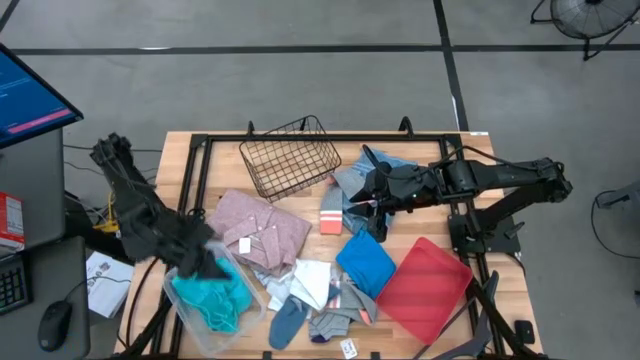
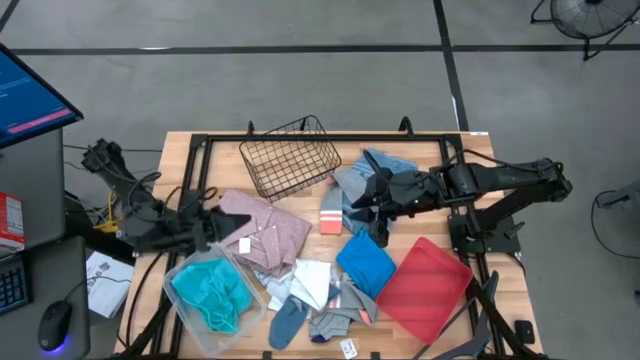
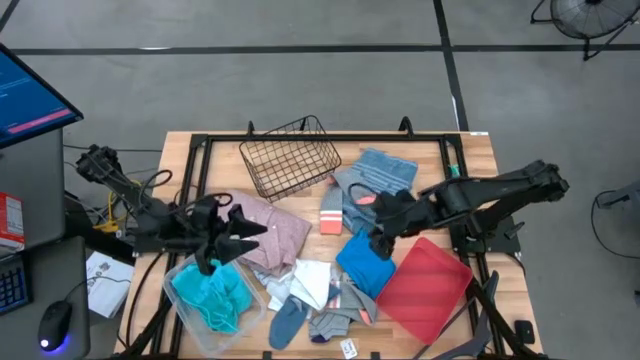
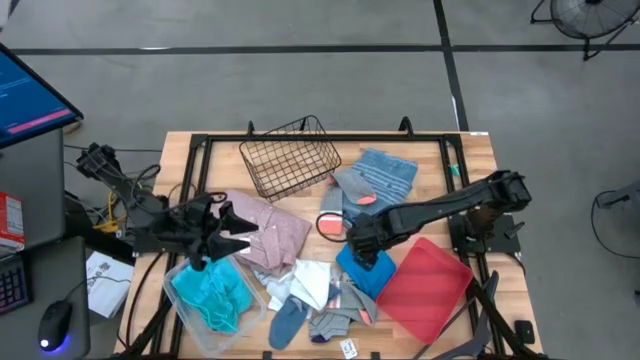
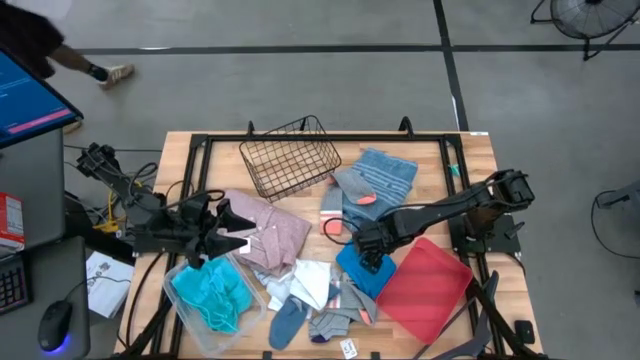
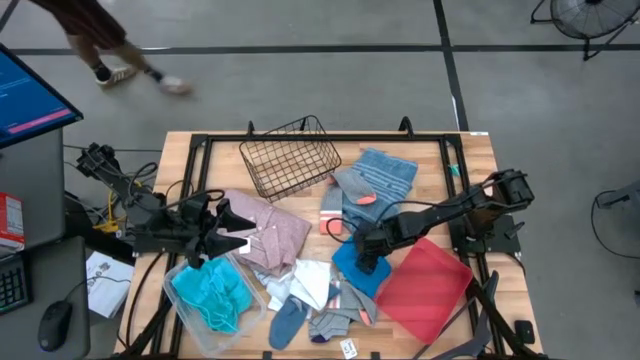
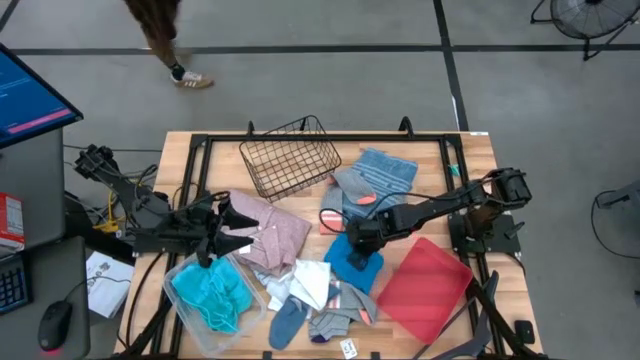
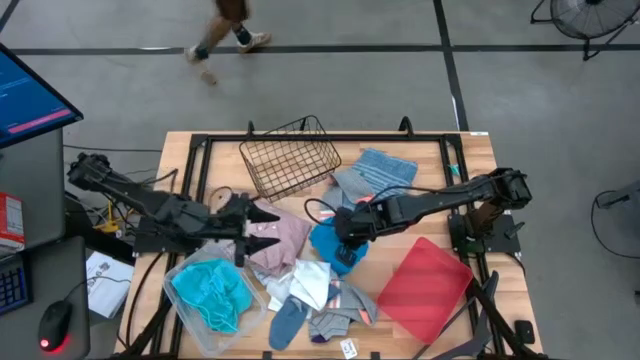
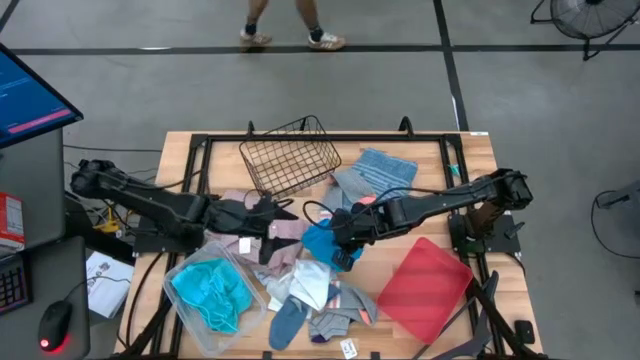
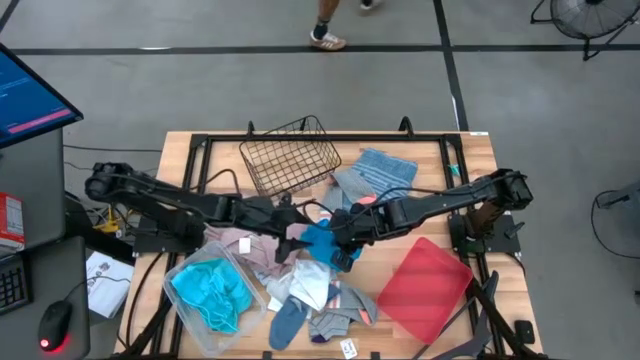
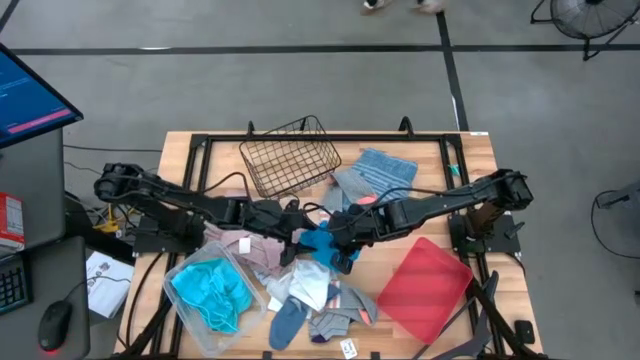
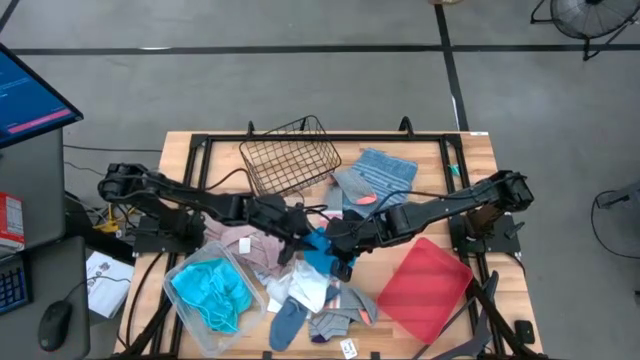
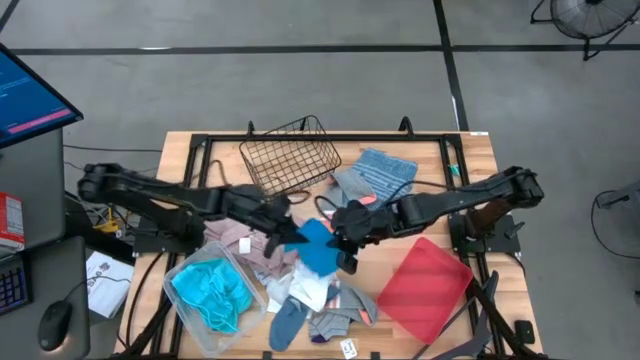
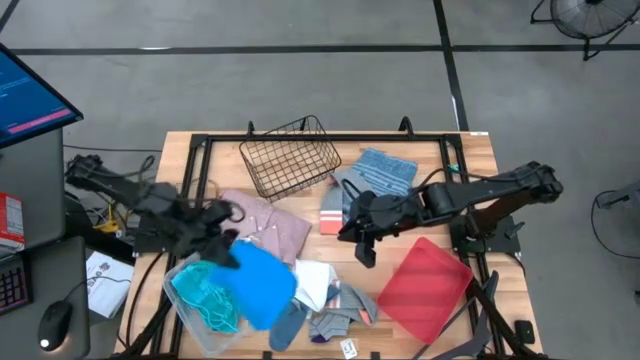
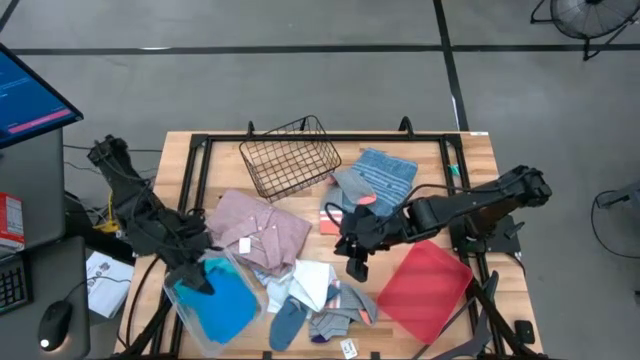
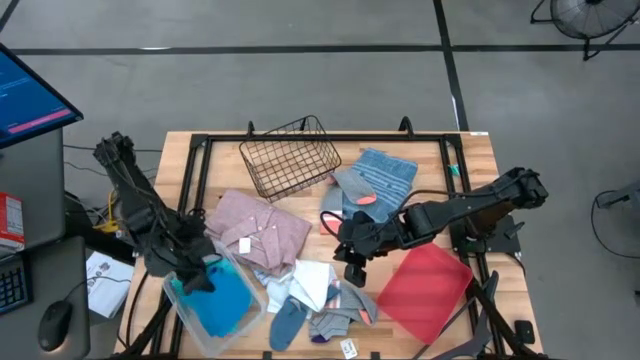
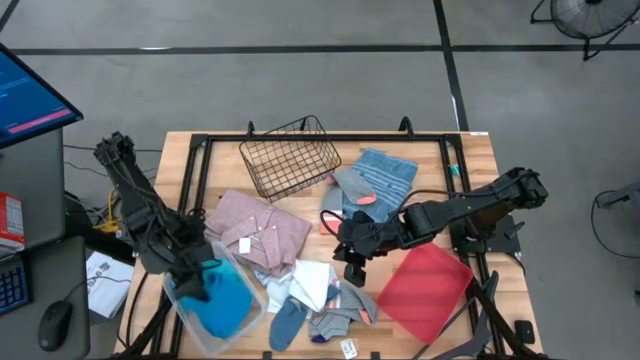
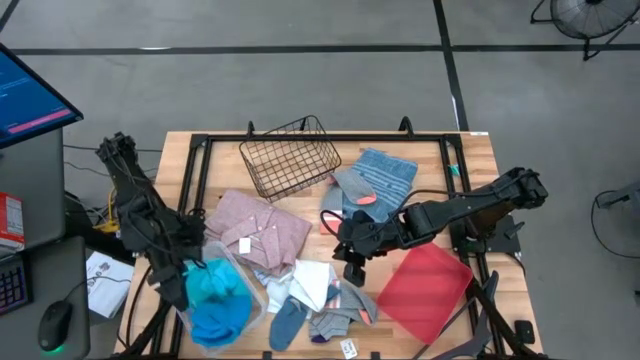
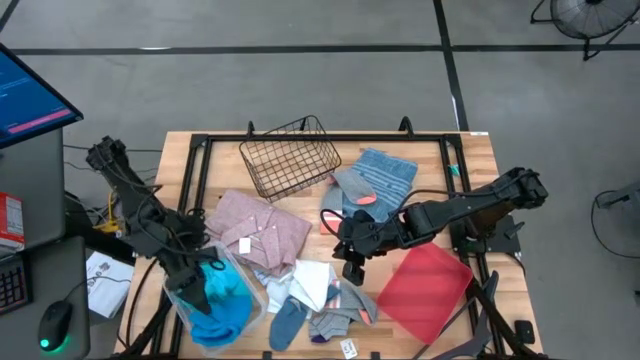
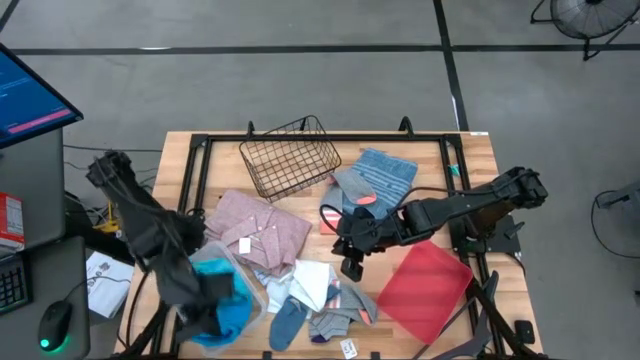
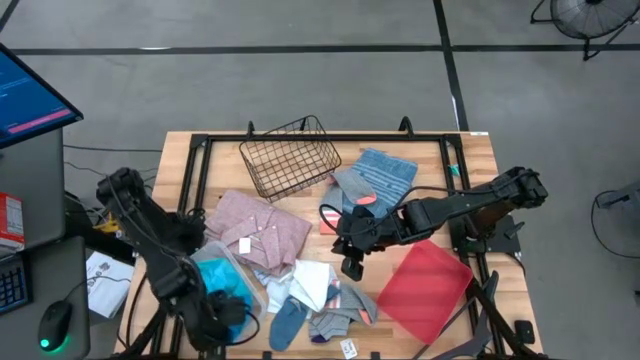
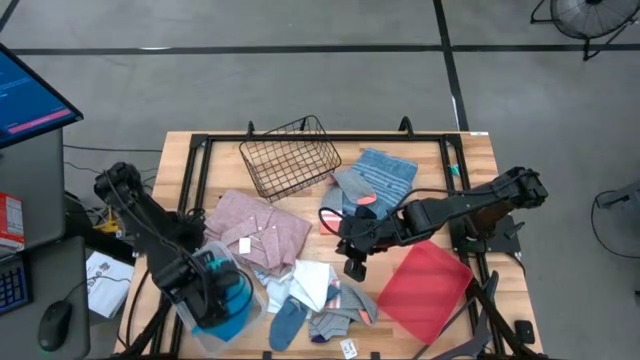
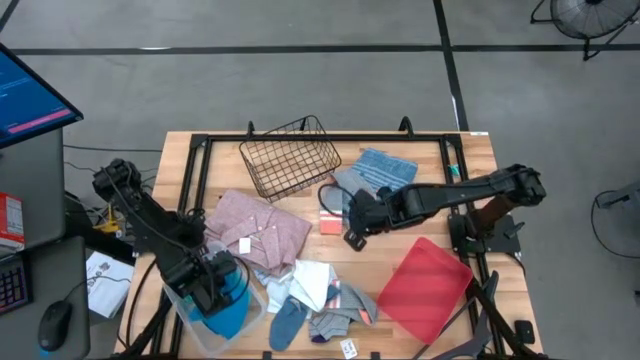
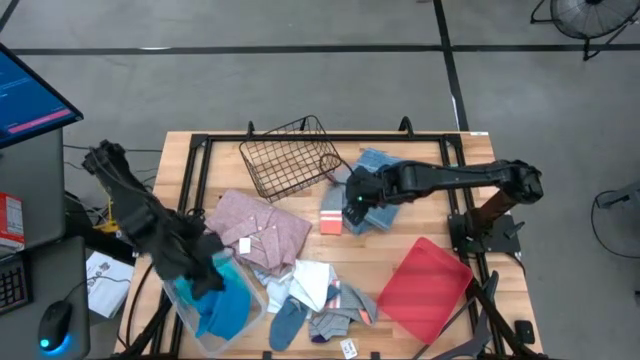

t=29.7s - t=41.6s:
Task: Pick & Place Cloths
Put the blue shorts into the transparent bin

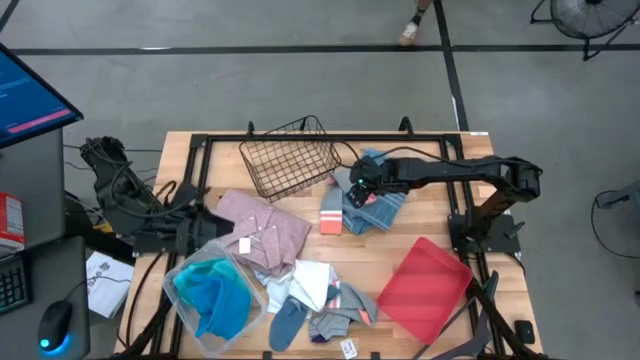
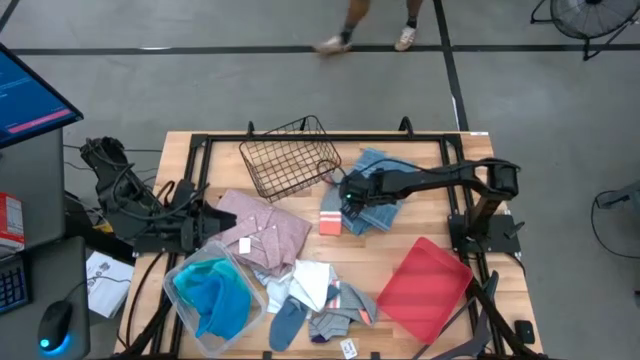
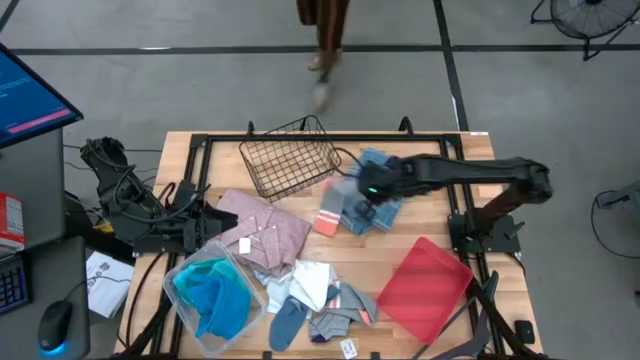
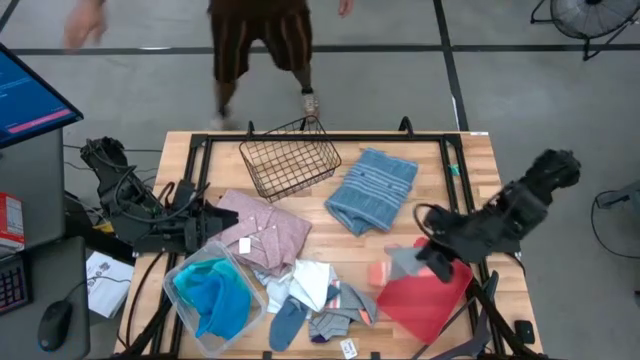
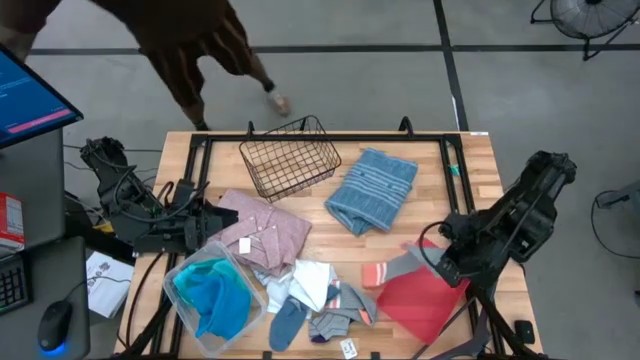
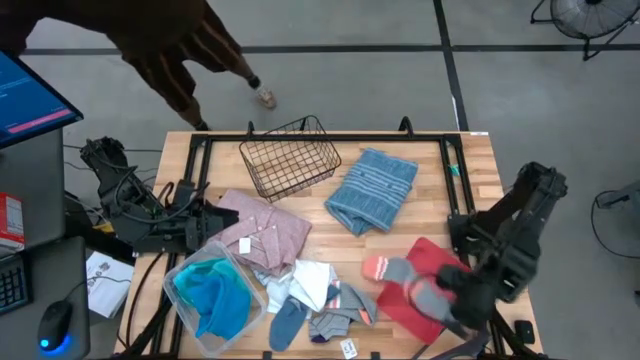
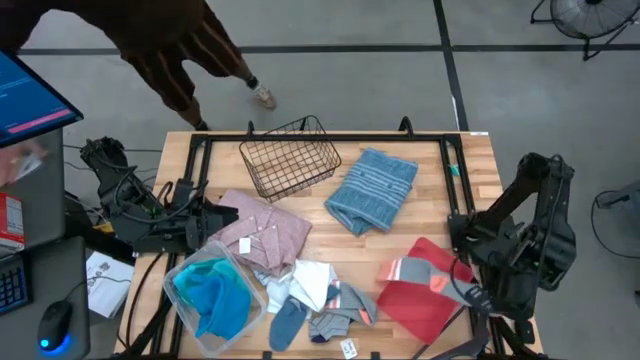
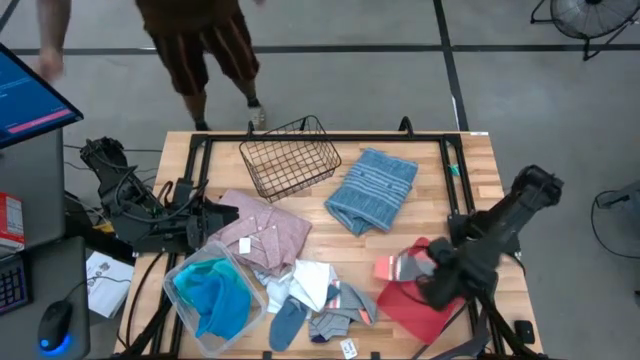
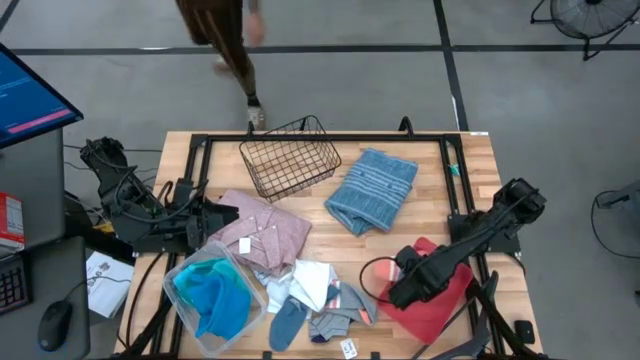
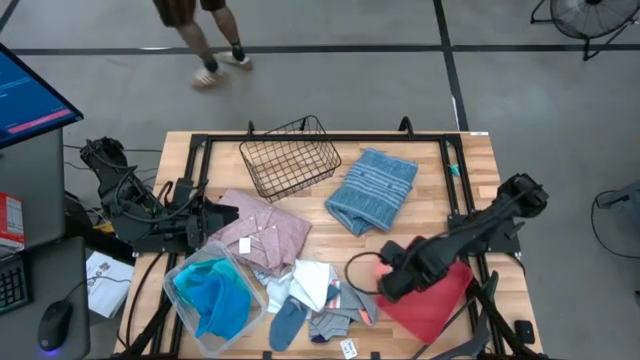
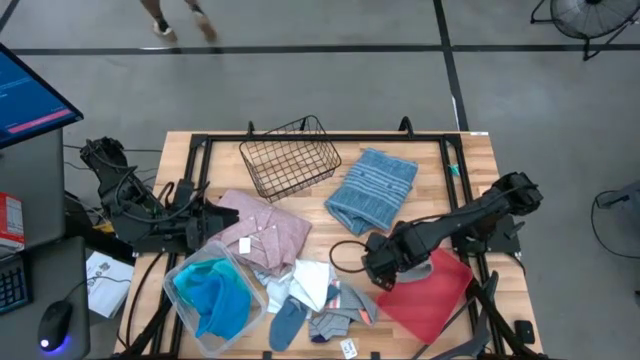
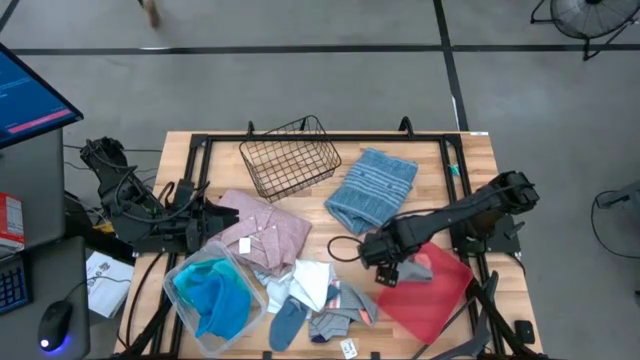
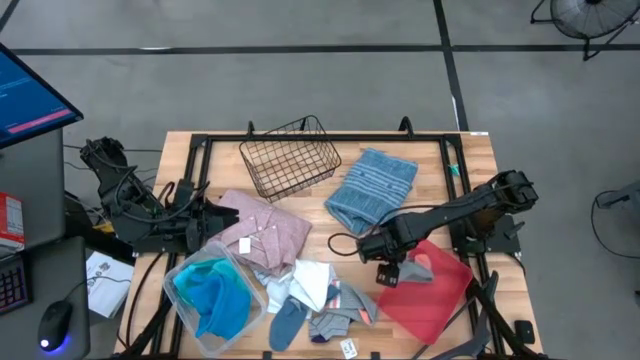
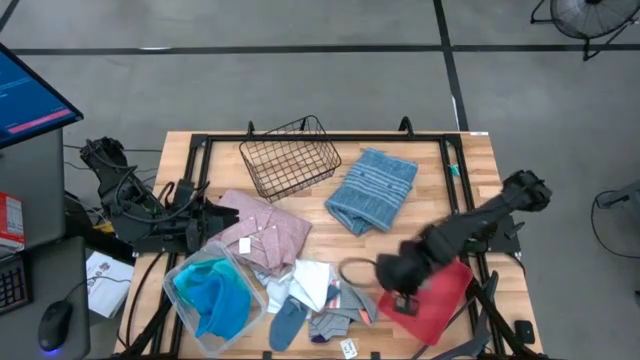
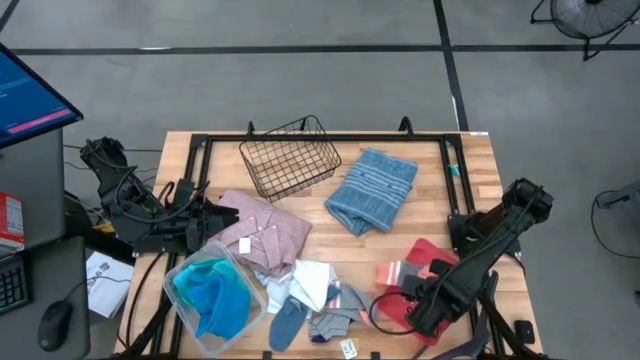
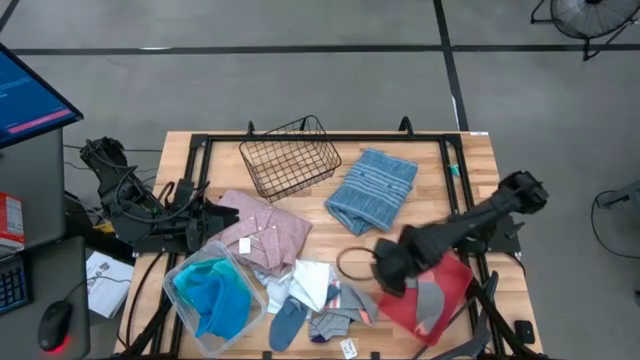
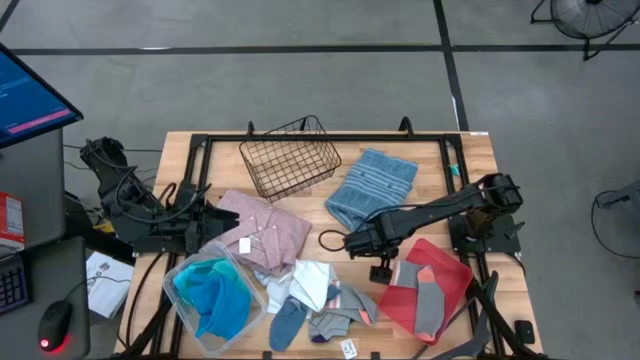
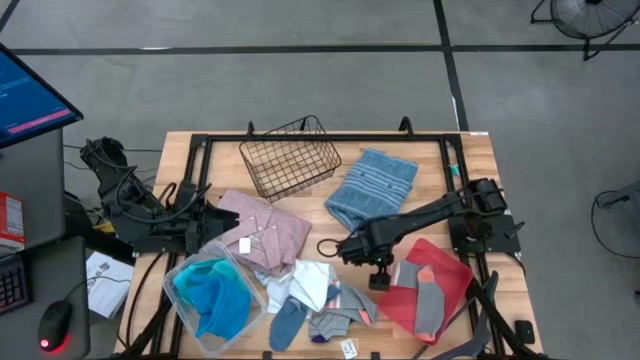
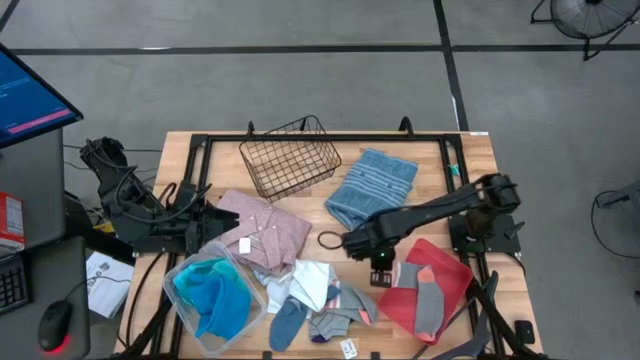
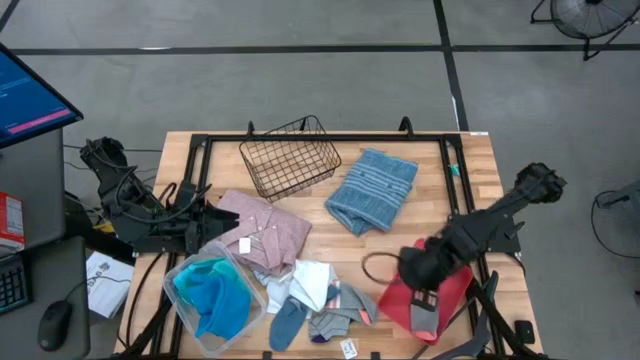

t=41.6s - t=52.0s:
Put the top gray patterned sock into the red bin
